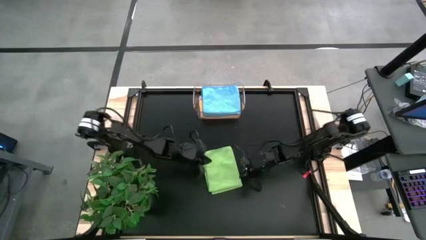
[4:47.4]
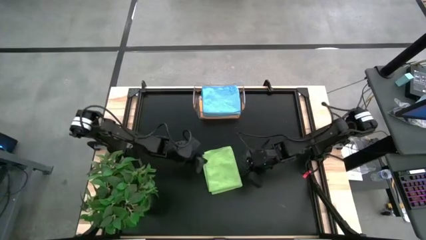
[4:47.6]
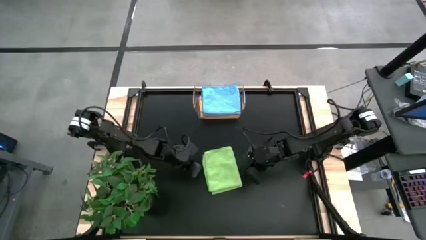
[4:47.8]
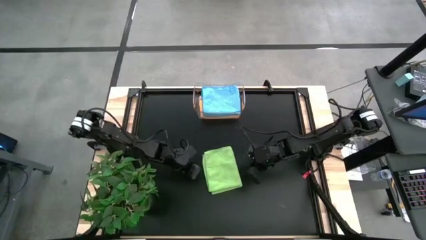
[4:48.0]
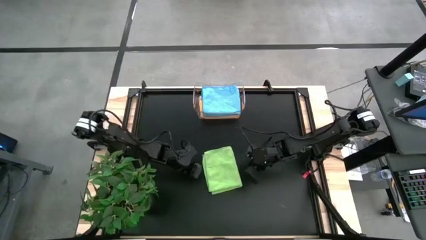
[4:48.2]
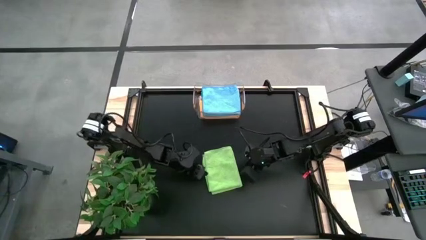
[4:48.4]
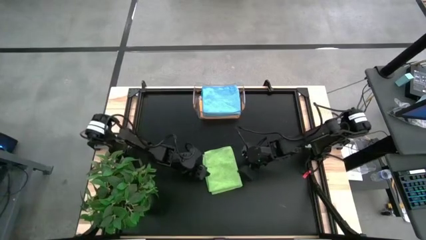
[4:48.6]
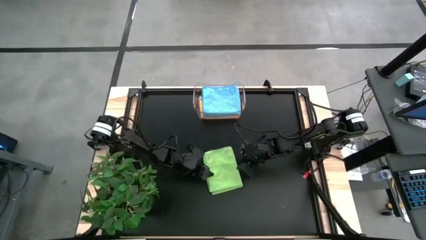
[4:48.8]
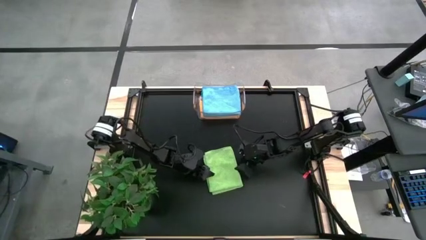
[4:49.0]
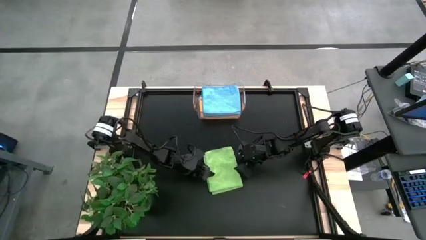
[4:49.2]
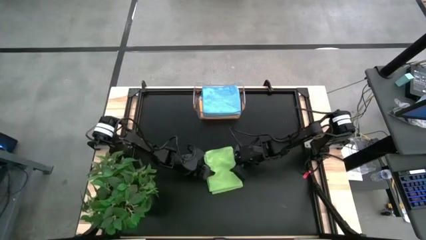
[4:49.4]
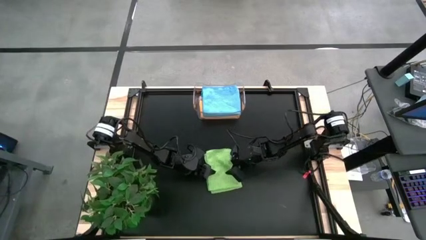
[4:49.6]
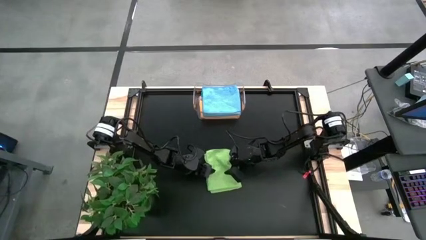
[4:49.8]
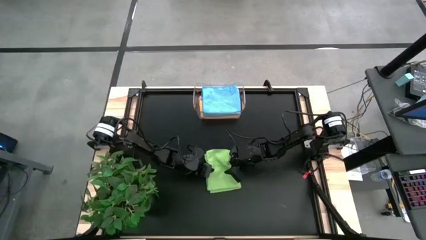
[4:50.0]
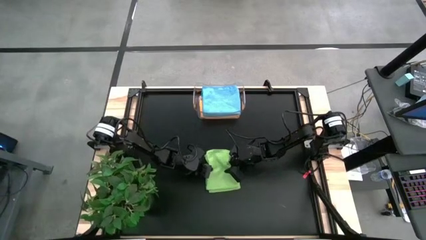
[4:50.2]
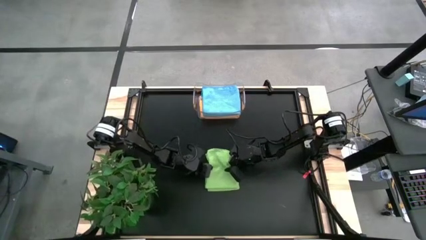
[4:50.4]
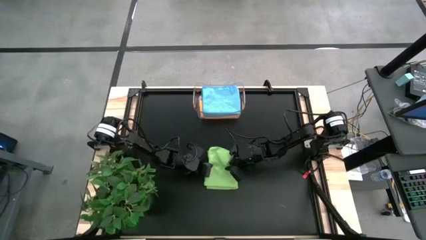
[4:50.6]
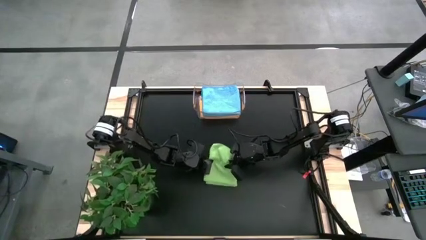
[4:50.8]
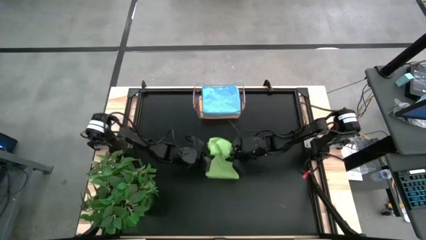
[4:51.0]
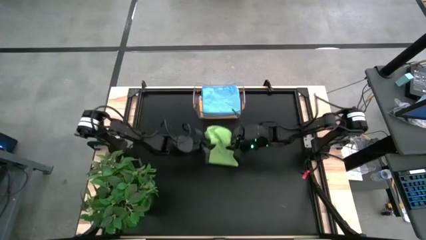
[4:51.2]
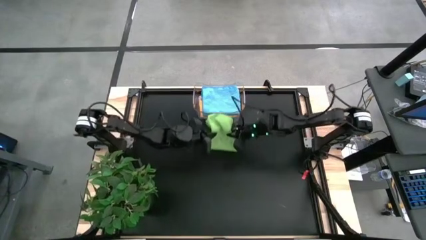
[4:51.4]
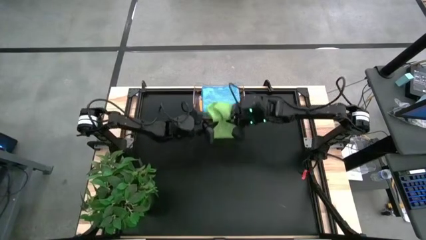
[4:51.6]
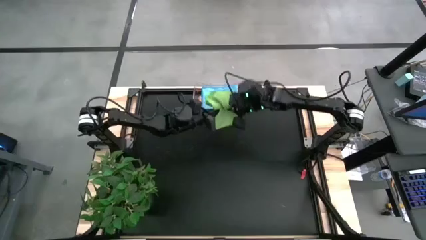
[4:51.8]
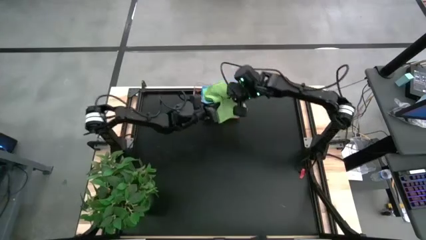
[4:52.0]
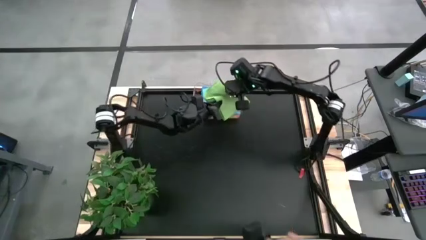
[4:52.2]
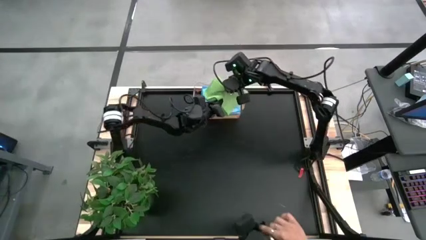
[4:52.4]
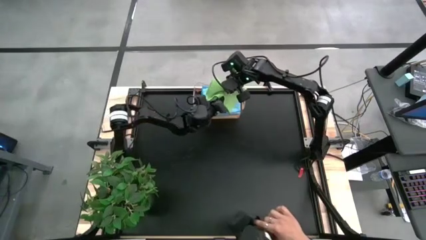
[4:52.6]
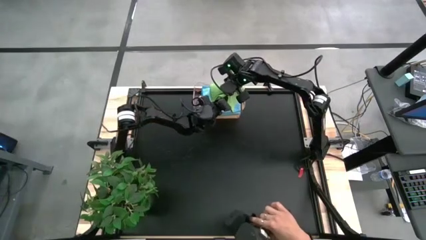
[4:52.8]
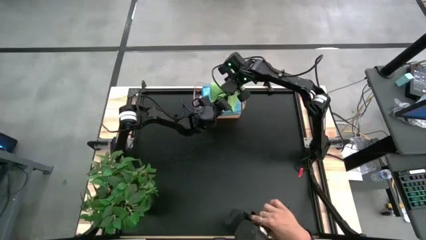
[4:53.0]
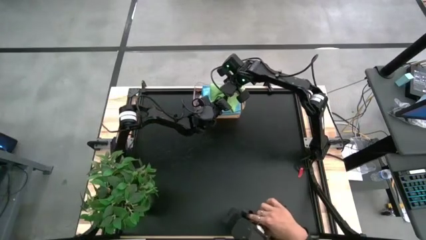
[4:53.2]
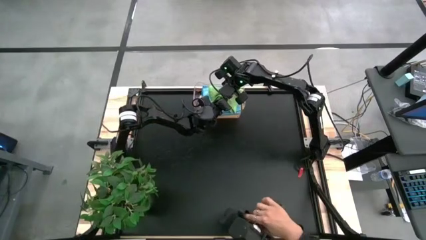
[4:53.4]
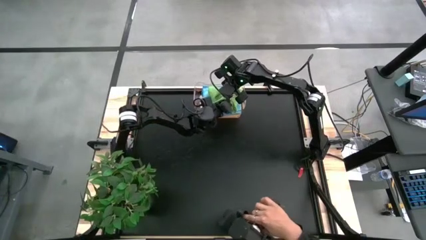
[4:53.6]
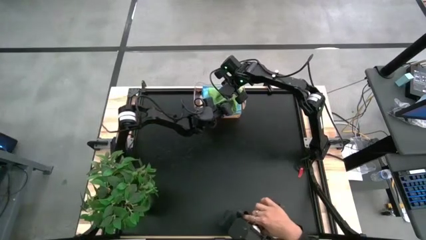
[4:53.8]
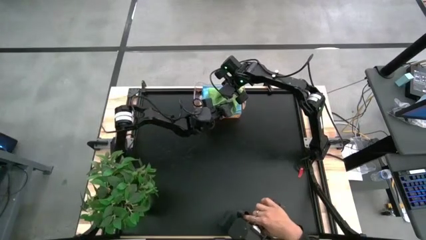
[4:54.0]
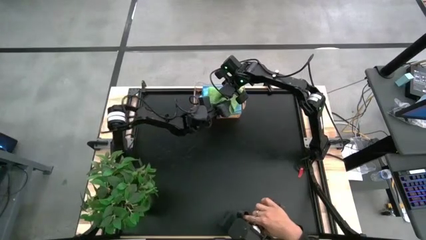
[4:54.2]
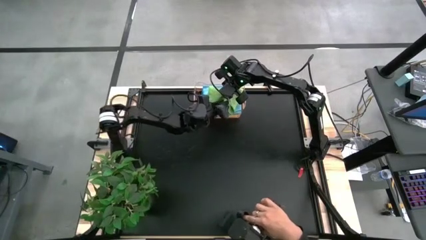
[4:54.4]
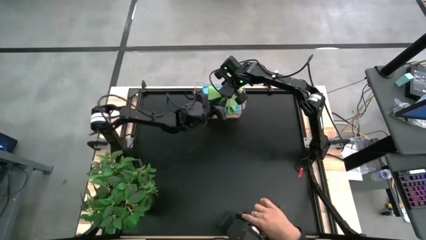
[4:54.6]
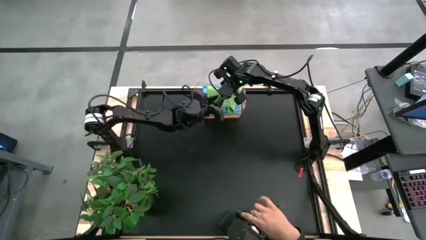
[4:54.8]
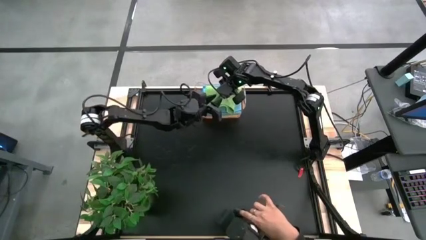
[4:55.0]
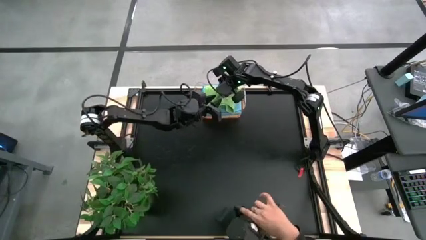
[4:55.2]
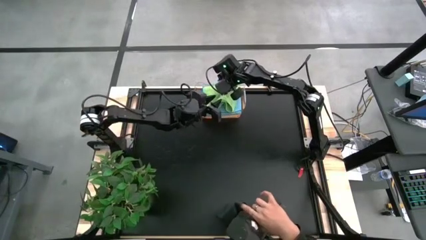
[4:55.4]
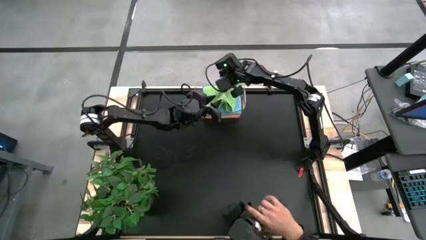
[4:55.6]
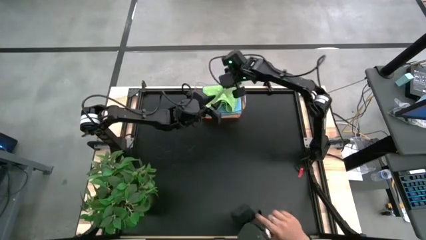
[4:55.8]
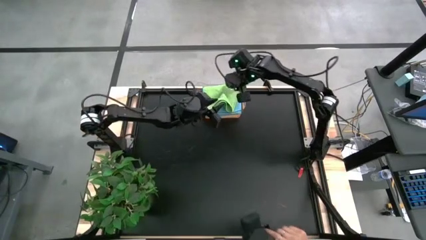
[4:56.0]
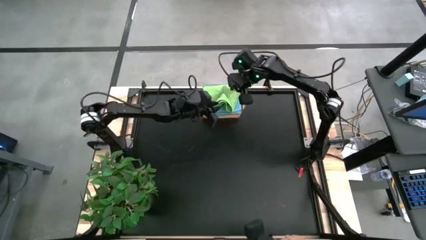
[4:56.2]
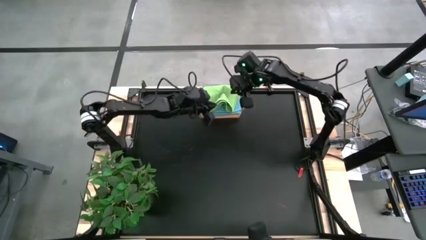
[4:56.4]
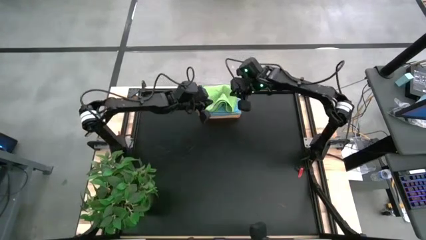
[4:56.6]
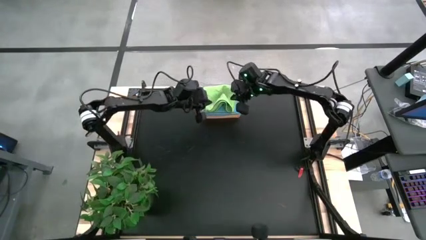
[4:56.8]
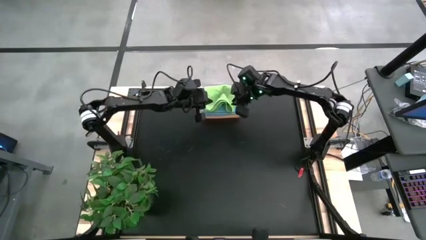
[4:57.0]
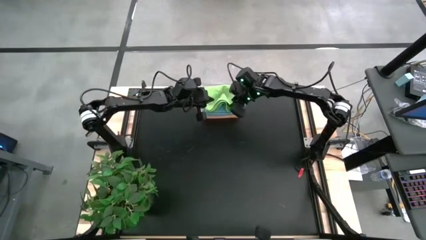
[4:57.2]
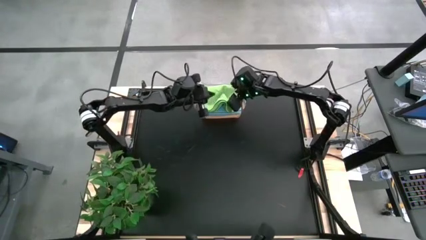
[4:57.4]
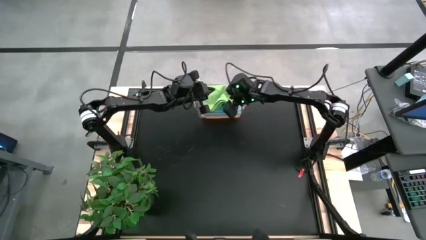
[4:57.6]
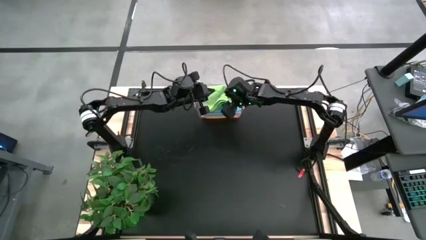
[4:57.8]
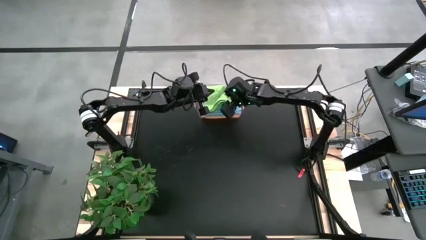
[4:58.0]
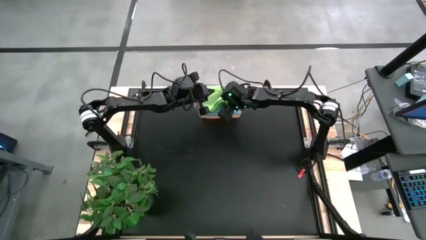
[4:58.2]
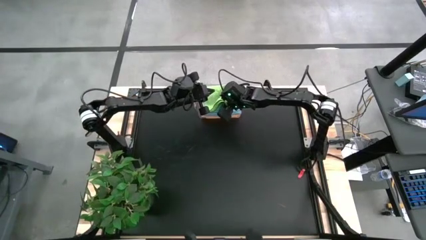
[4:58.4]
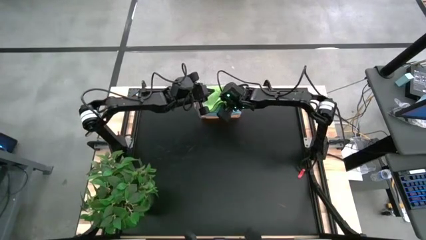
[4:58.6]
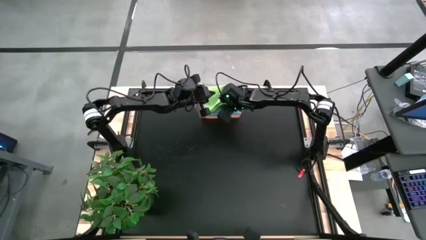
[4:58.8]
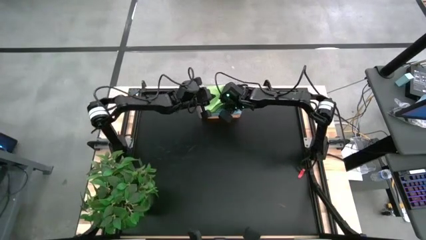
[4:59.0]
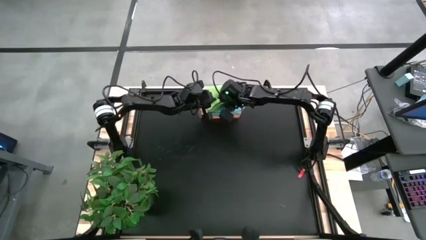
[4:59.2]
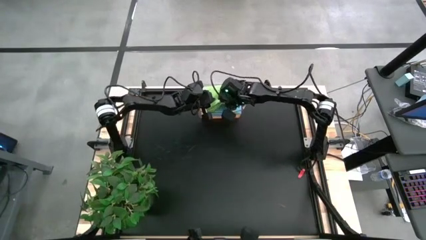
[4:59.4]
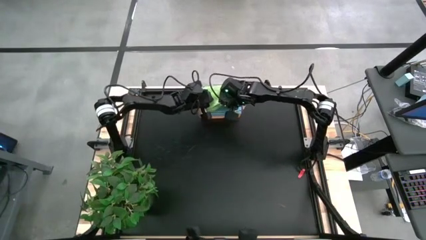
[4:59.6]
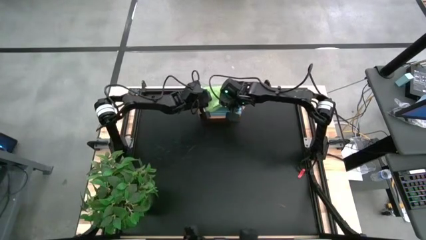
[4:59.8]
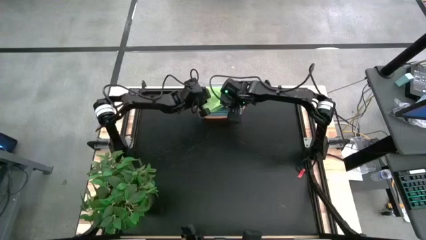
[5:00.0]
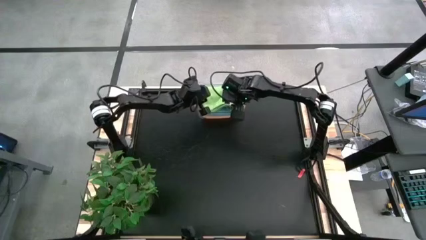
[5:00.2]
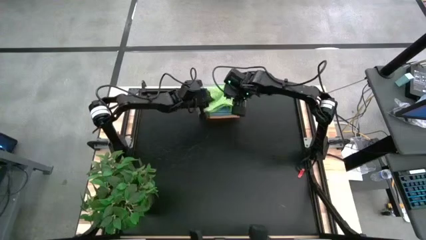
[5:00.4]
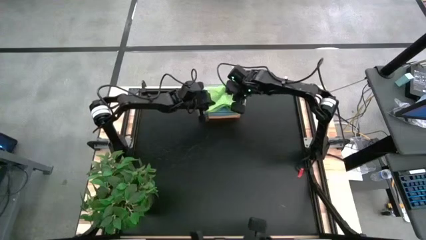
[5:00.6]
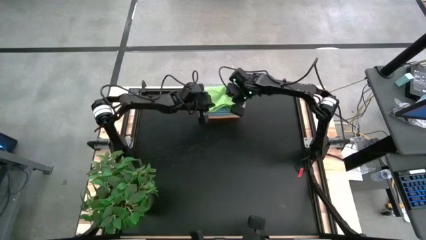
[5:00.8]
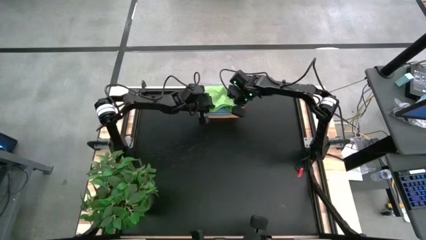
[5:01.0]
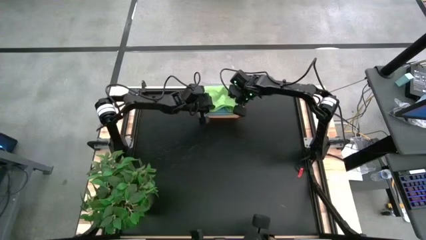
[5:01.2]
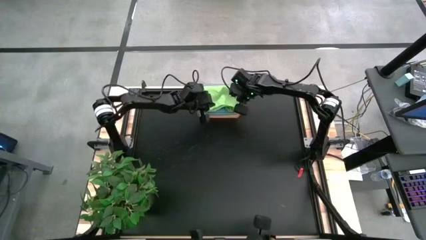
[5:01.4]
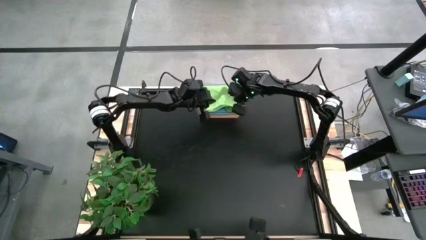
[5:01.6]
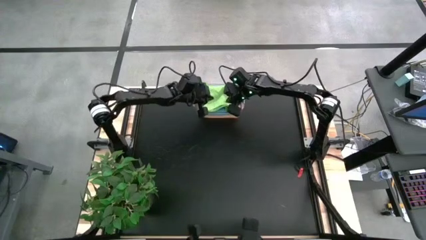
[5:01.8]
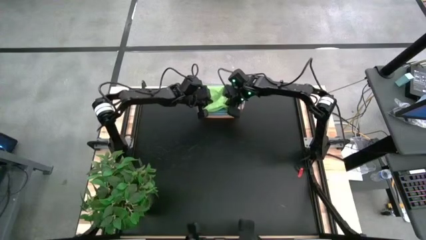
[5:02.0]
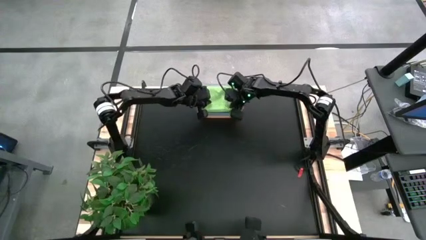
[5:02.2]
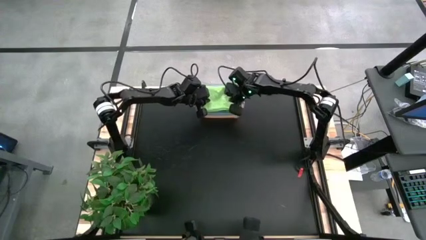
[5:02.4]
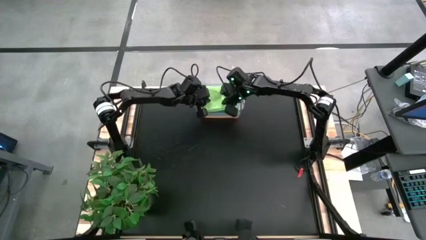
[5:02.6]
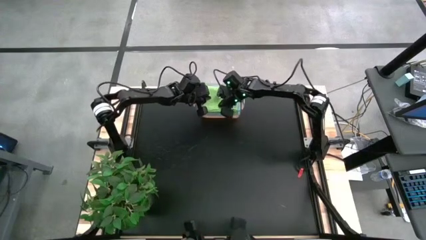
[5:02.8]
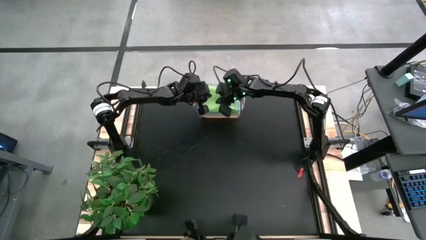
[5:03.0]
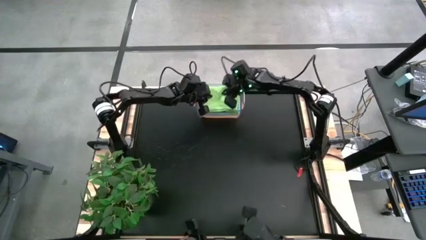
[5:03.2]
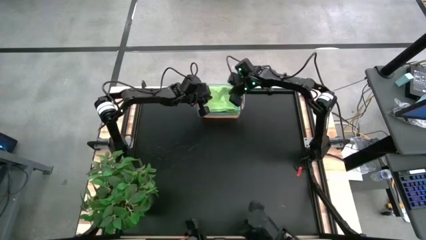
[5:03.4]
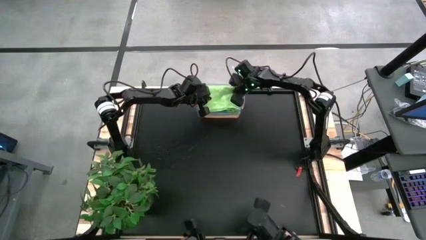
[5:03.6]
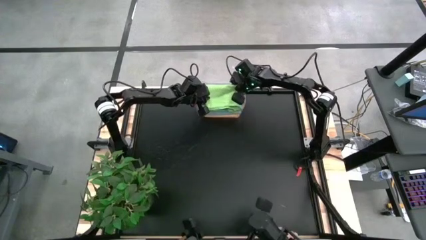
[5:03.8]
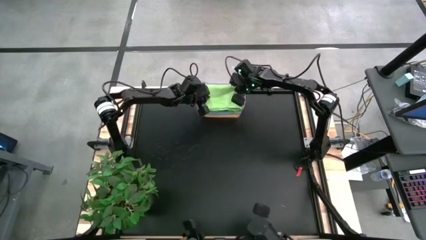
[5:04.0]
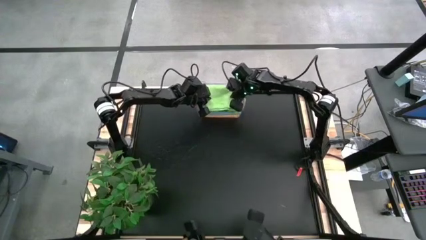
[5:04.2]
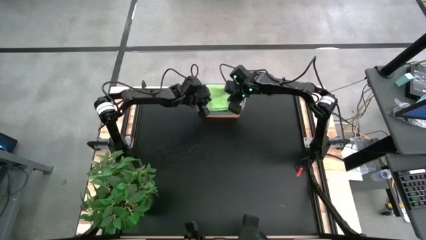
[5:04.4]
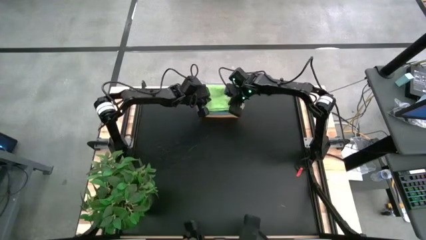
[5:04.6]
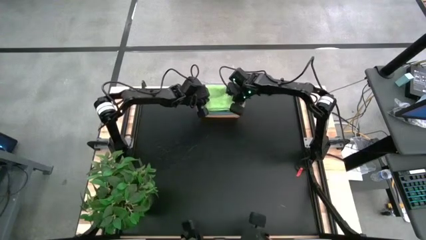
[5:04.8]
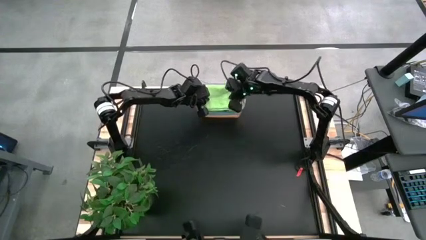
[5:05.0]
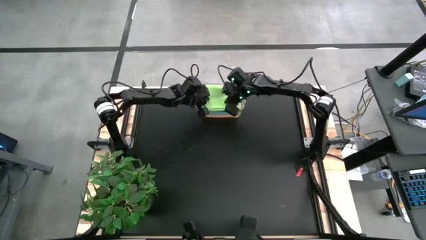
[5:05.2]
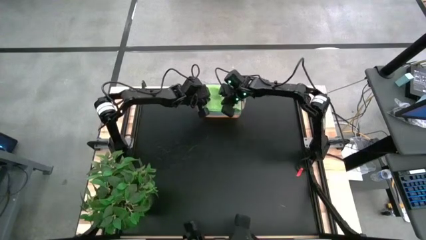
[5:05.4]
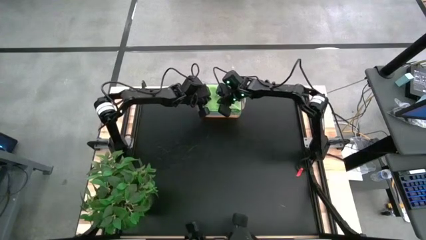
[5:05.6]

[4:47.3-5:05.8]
Task: Fold microfiber towels
Put the green microfiber cloth into the transparent bin
